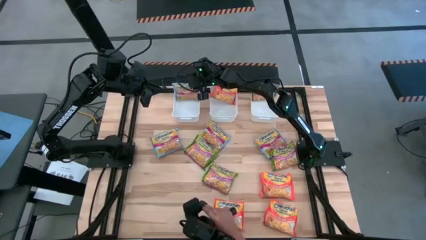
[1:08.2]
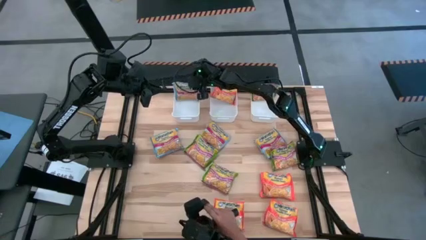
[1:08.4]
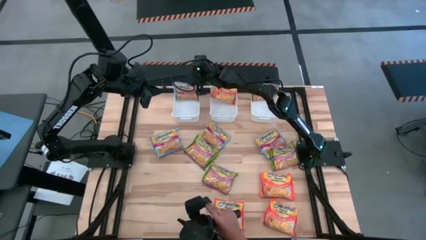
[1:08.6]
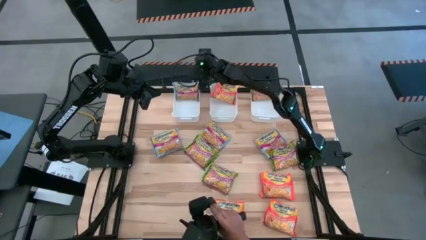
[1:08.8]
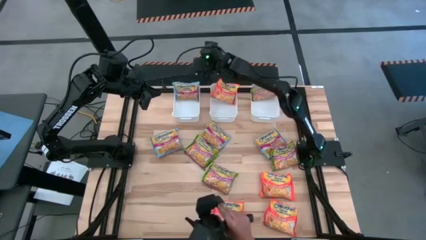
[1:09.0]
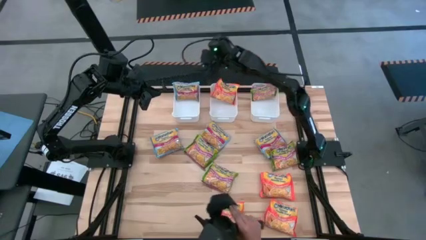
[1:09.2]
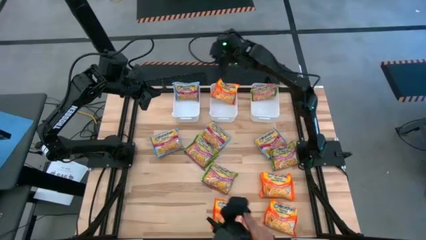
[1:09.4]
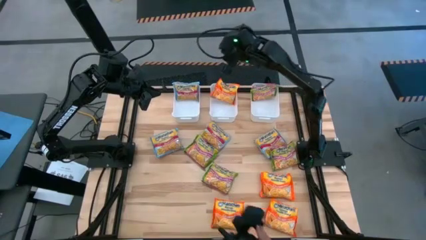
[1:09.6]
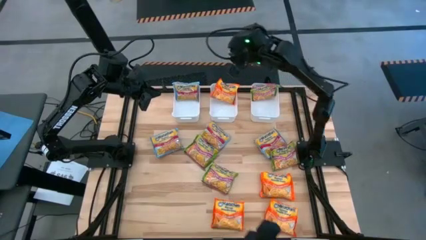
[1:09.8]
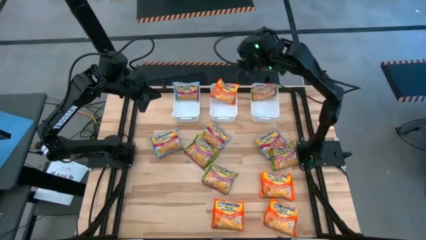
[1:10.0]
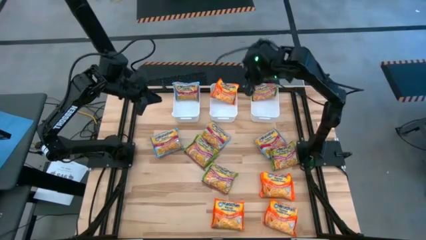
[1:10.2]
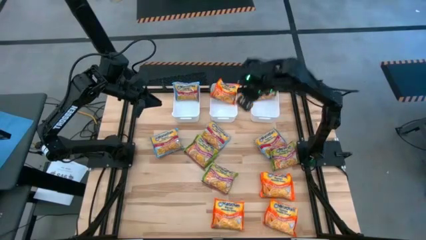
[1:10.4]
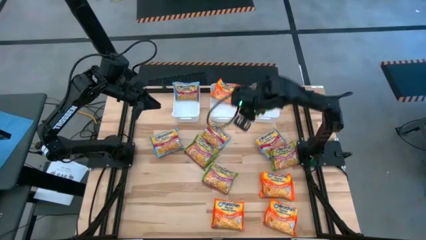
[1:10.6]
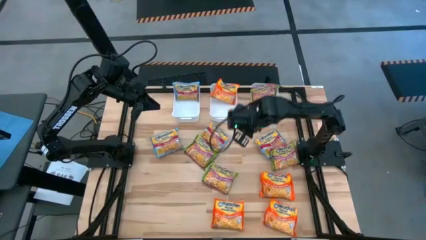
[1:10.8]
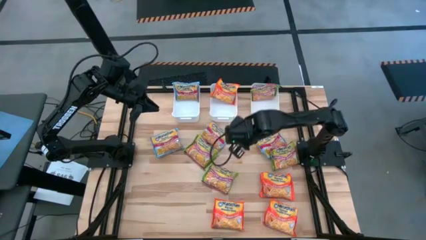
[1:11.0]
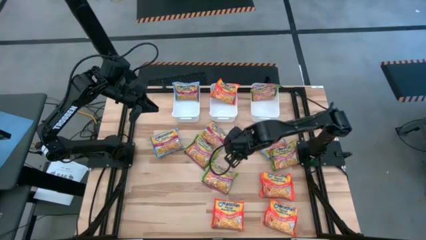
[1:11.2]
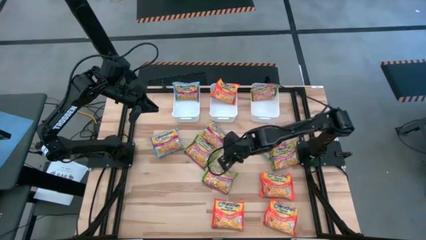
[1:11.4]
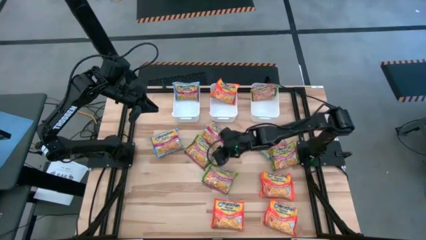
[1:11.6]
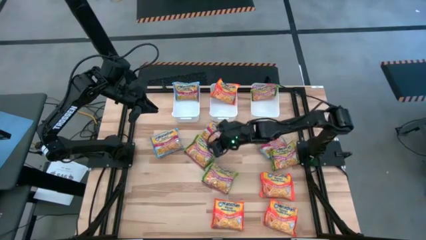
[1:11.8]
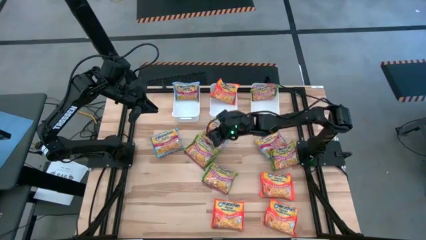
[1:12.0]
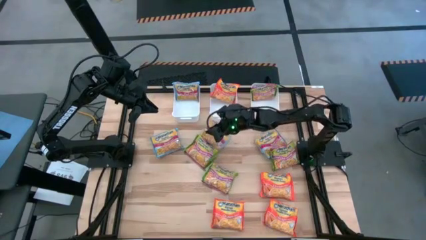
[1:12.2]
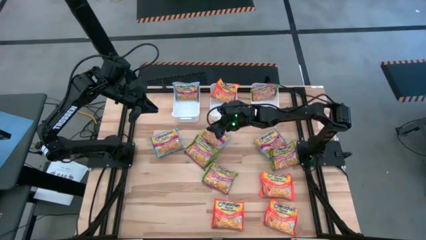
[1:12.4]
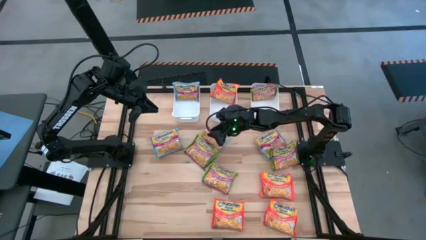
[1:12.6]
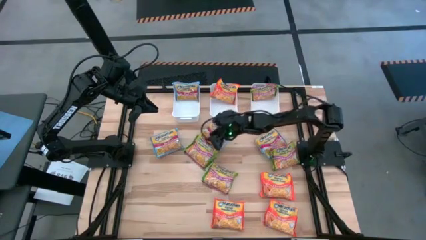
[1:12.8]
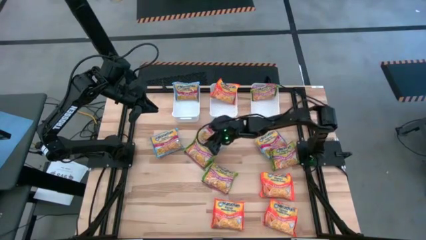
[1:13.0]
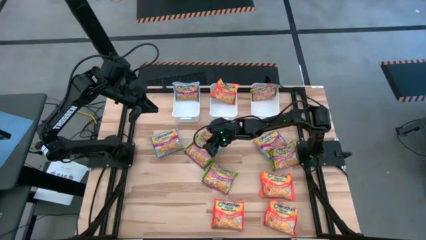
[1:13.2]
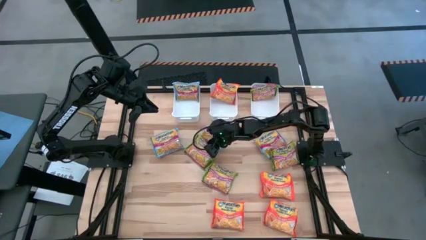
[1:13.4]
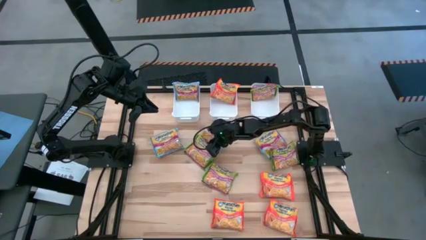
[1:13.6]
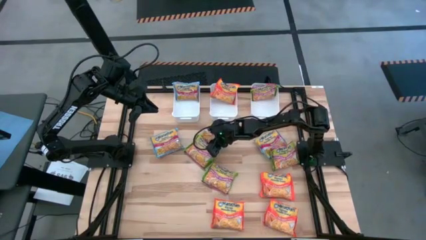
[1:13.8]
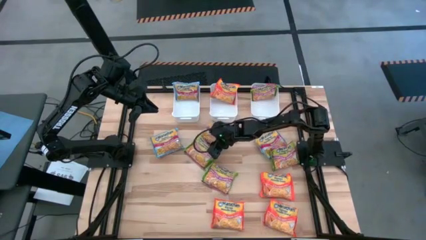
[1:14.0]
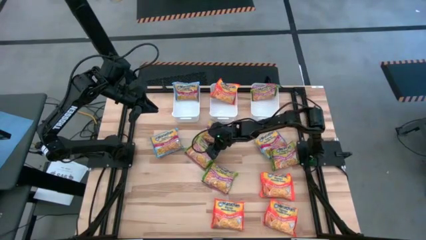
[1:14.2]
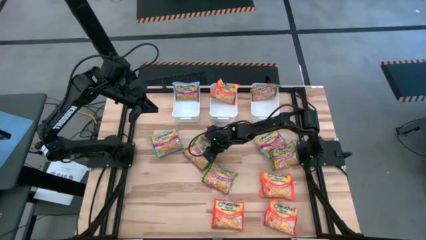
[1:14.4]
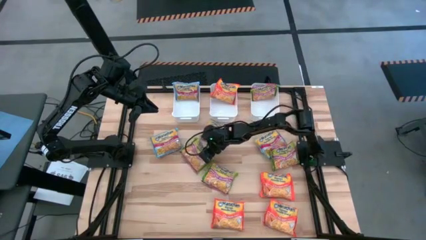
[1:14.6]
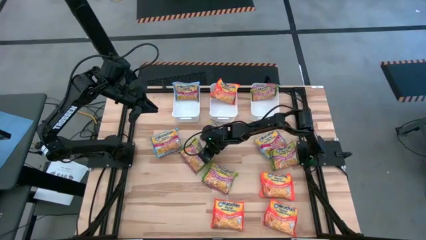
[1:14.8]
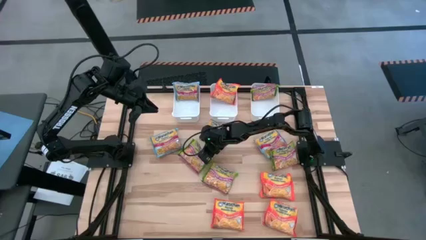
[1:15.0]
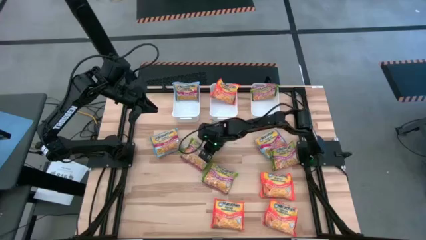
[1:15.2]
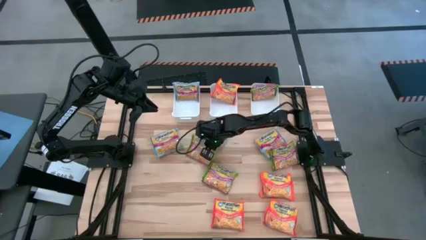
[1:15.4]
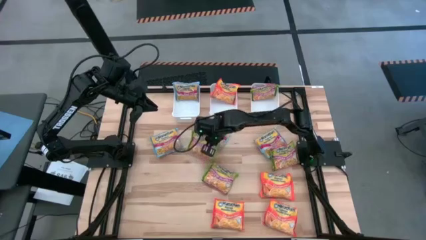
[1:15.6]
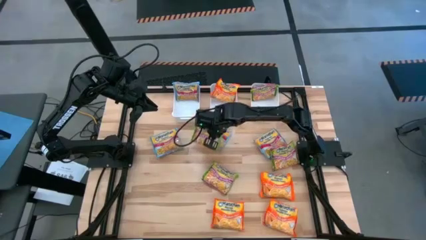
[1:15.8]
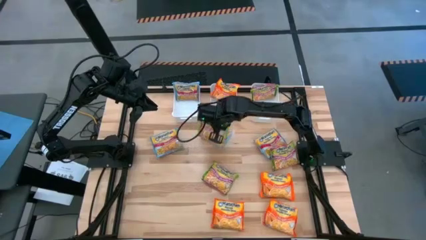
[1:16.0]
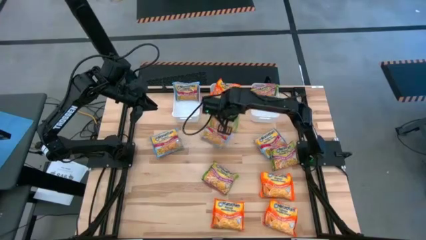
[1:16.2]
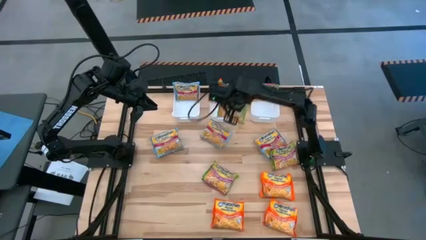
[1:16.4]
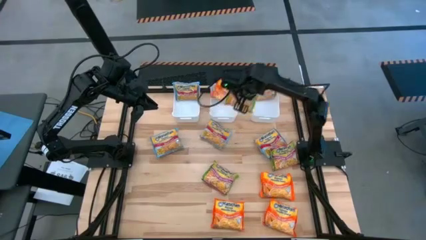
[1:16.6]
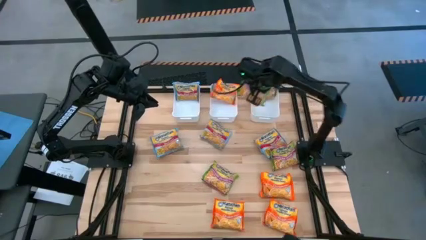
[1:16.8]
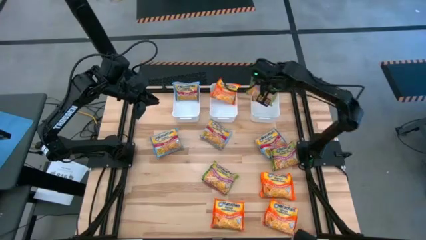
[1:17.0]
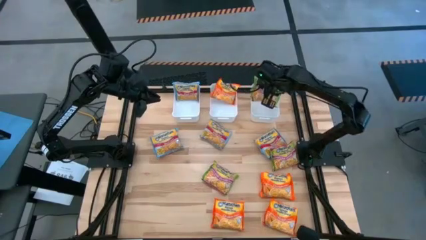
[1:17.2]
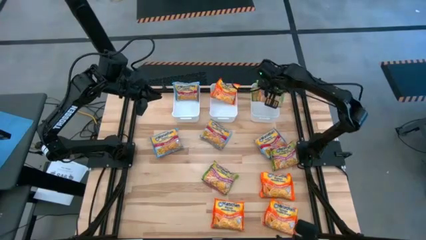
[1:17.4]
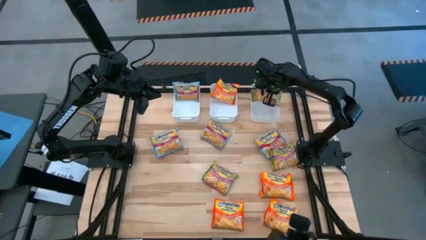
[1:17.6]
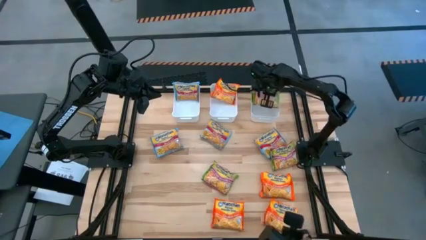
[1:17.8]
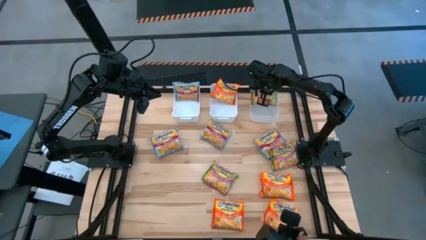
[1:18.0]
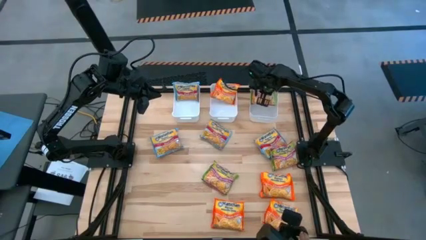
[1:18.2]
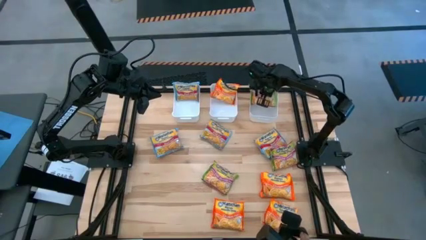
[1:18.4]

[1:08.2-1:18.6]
Task: Sort Maruchan noodles
Put the green noodle pack into the right white bin

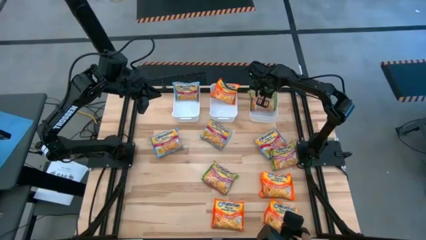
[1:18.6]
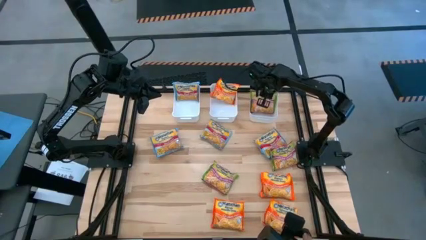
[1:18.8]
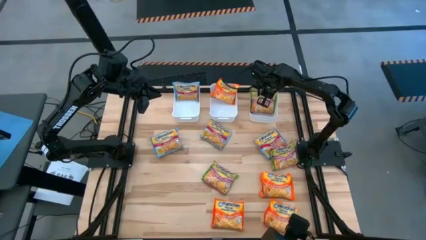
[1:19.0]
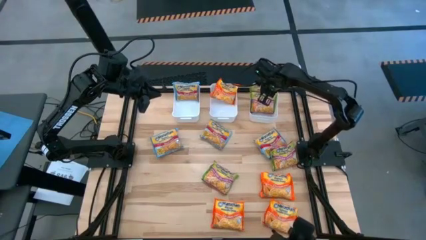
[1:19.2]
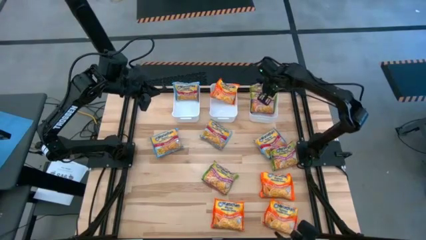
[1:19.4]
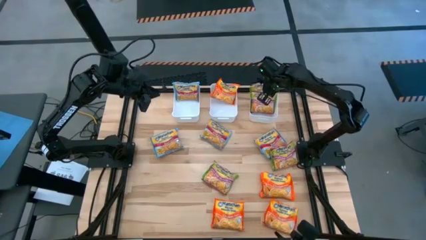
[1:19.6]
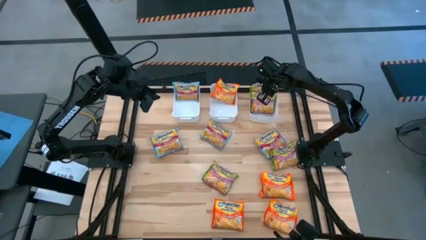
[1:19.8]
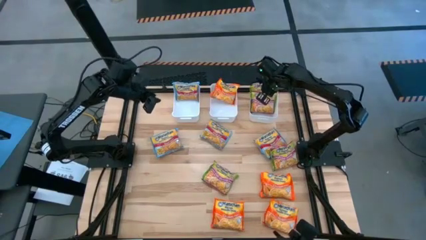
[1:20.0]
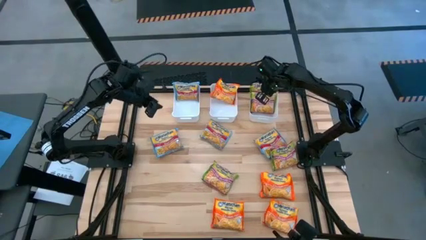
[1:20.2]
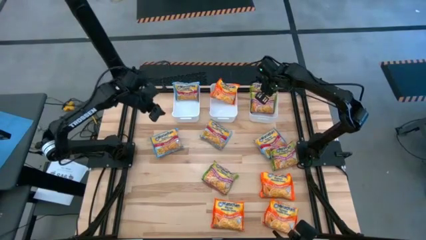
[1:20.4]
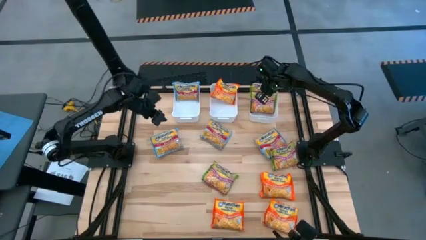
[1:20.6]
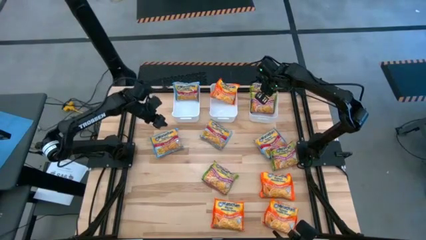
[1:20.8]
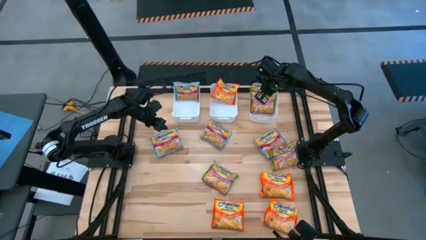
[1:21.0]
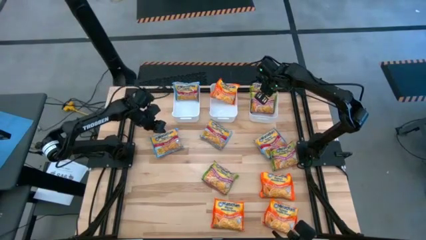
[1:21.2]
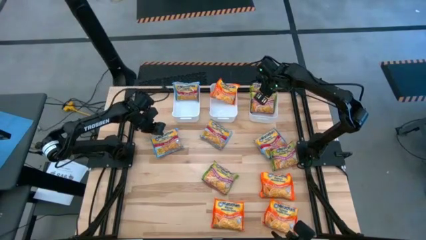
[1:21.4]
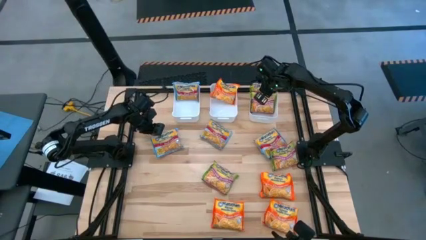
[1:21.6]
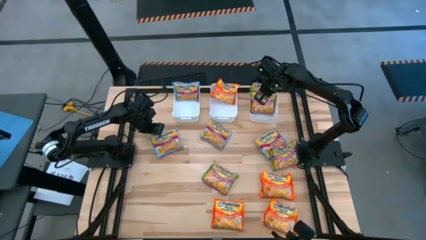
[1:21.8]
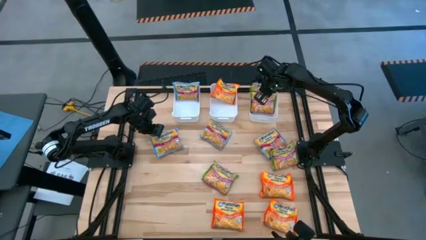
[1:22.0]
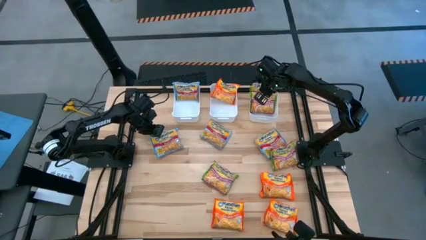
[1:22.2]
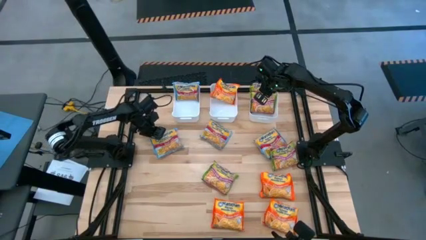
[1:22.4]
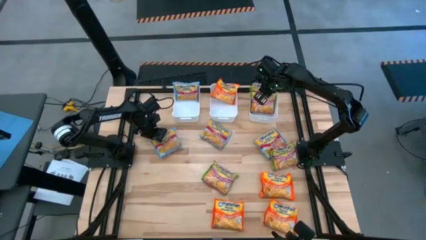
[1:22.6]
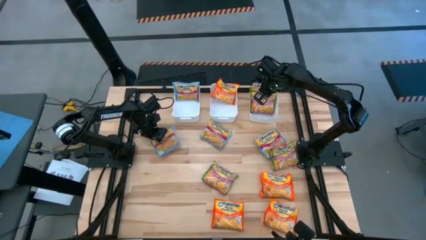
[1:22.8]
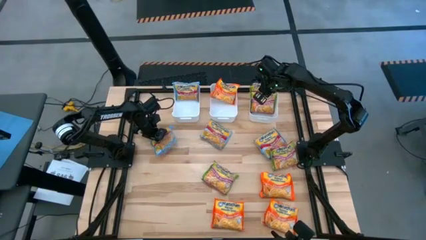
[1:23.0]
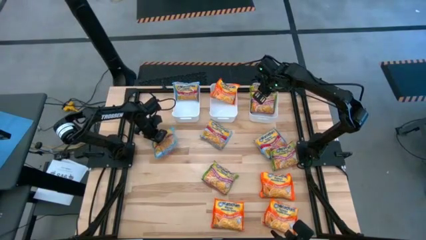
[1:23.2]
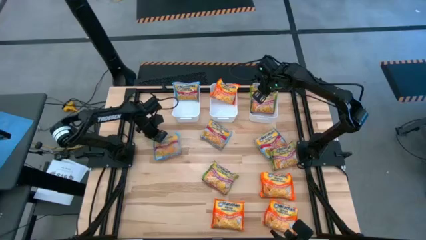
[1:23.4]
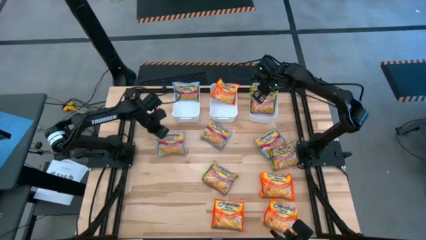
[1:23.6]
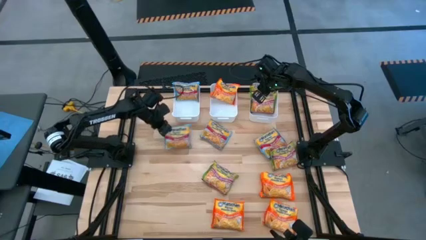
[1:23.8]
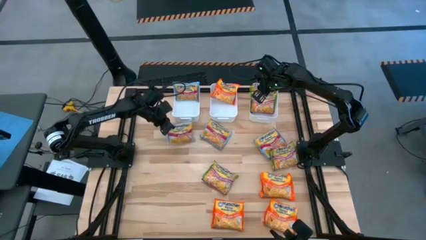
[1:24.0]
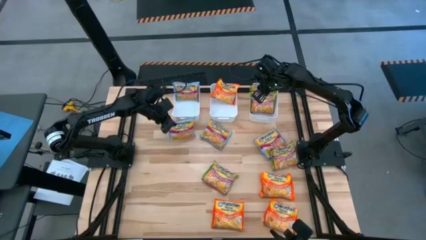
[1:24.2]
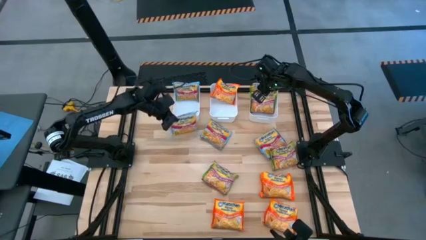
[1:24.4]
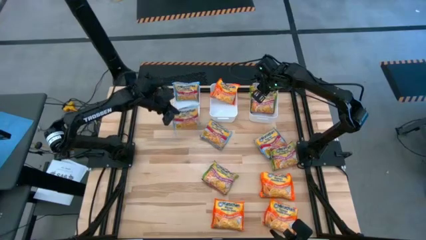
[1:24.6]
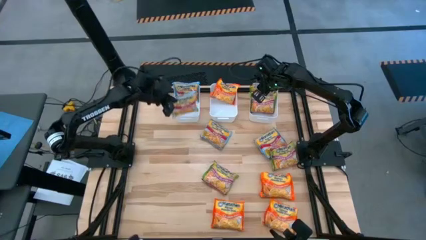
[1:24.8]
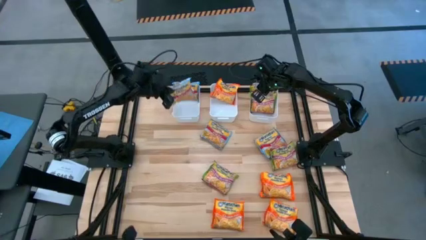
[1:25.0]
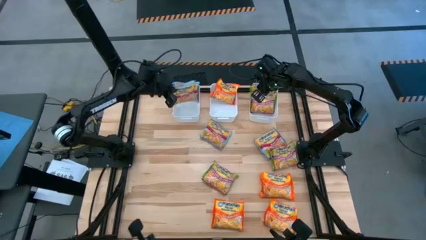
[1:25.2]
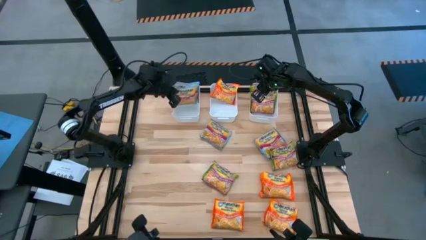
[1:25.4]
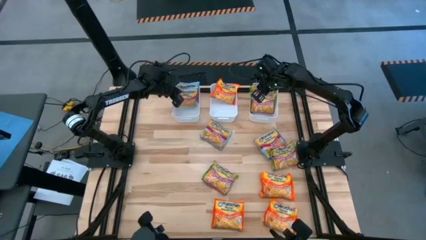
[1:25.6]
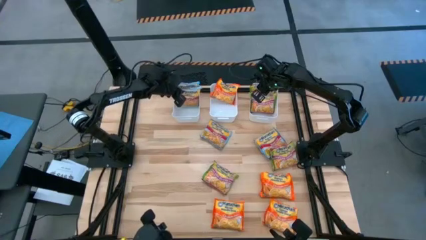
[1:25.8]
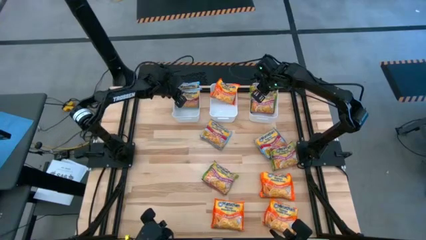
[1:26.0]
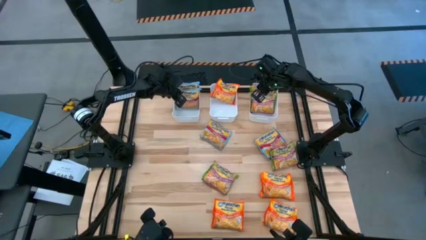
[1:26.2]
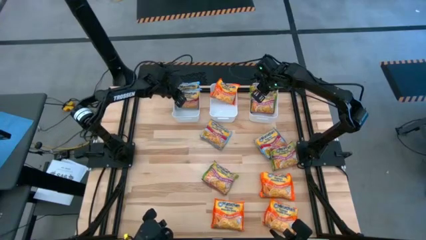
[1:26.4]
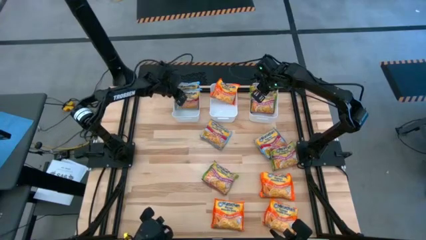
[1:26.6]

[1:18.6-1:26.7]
Put the blue noodle pack into the left white bin
